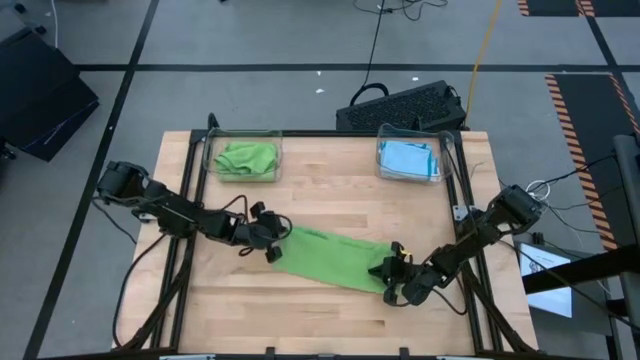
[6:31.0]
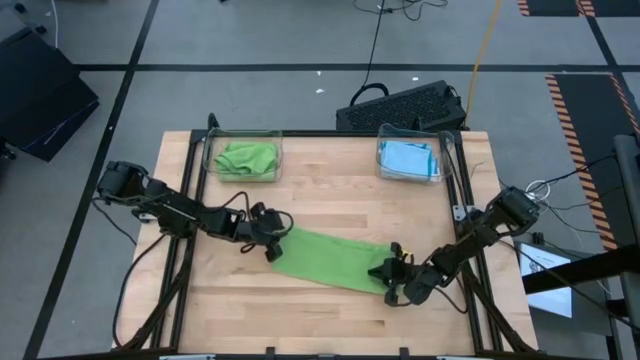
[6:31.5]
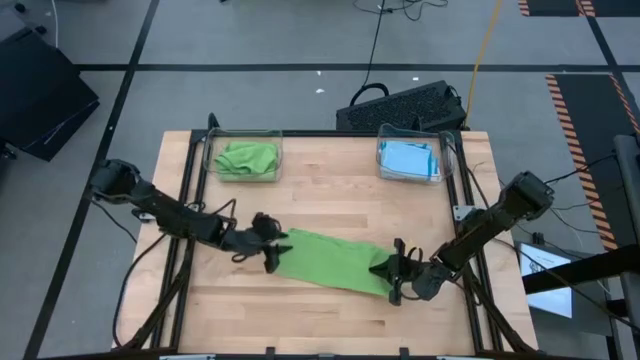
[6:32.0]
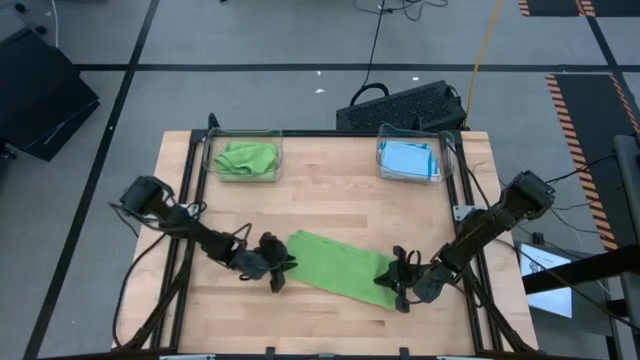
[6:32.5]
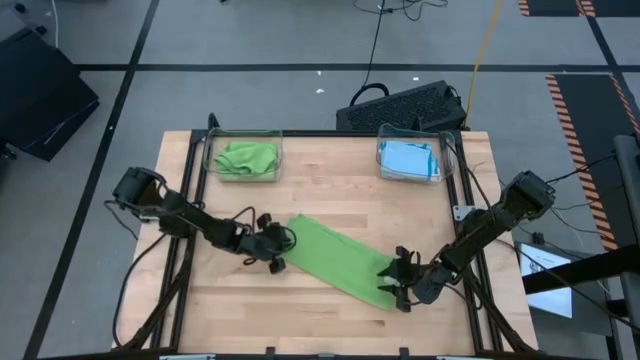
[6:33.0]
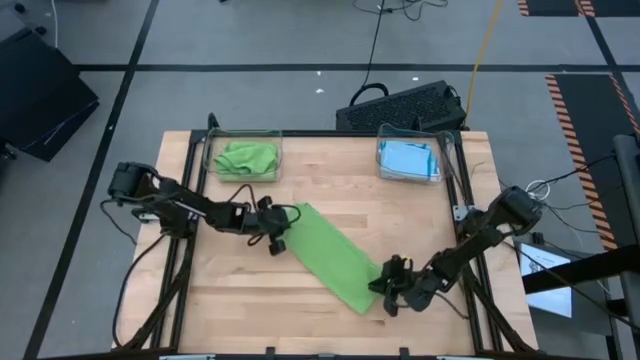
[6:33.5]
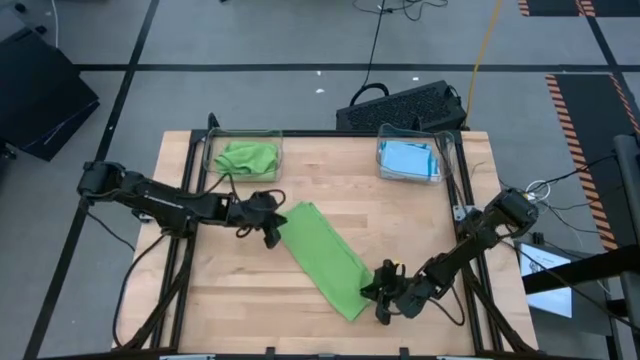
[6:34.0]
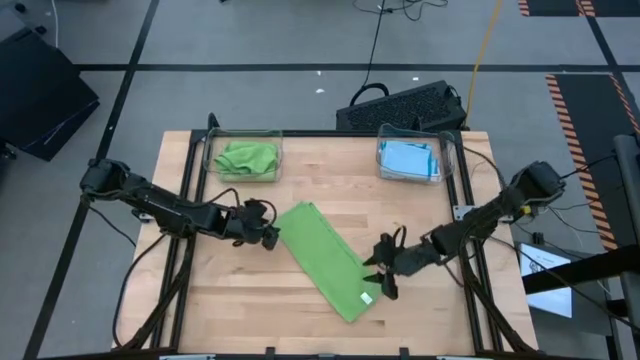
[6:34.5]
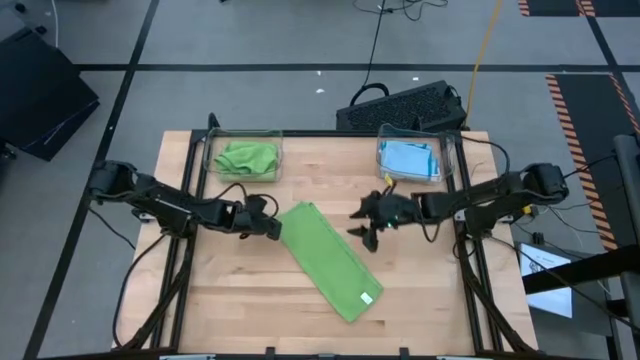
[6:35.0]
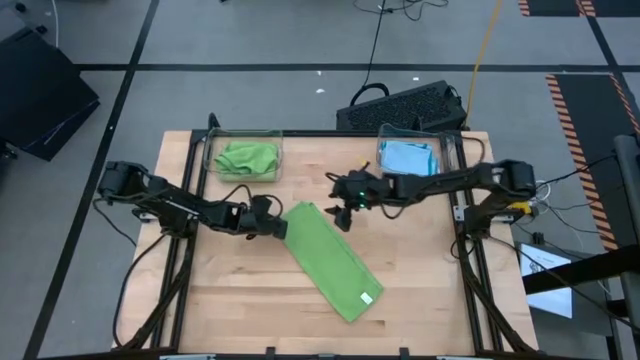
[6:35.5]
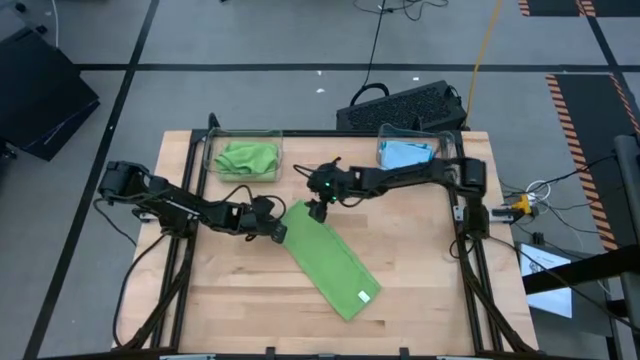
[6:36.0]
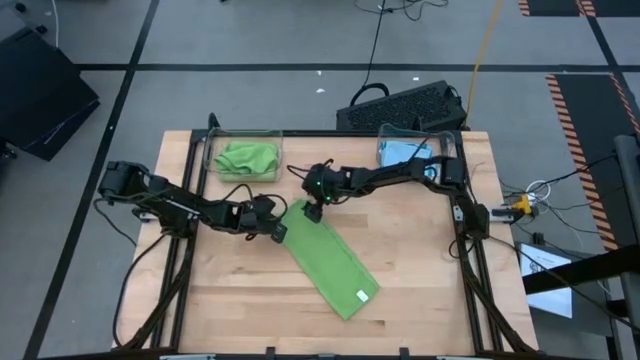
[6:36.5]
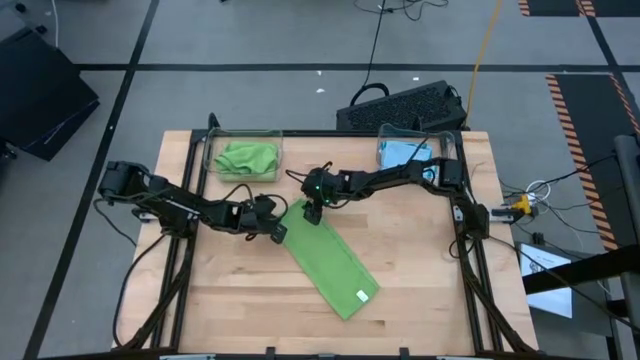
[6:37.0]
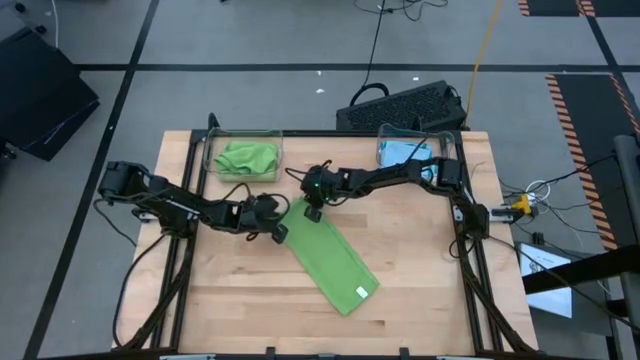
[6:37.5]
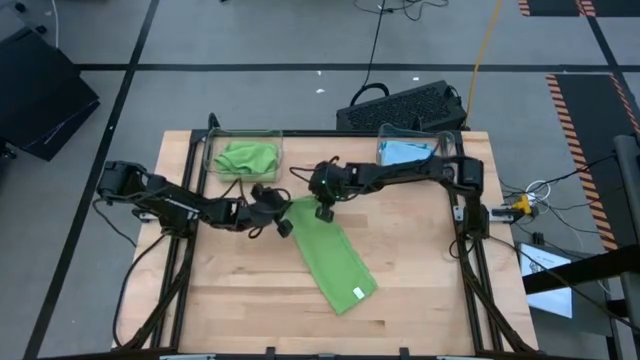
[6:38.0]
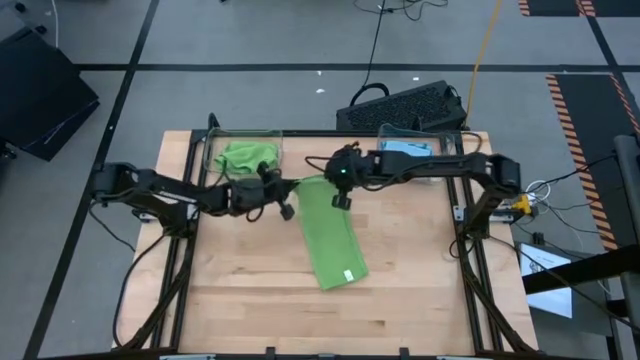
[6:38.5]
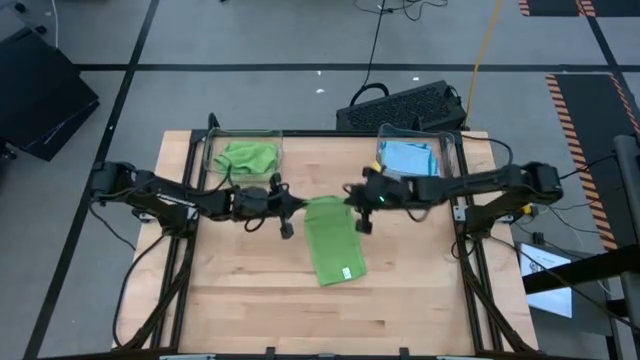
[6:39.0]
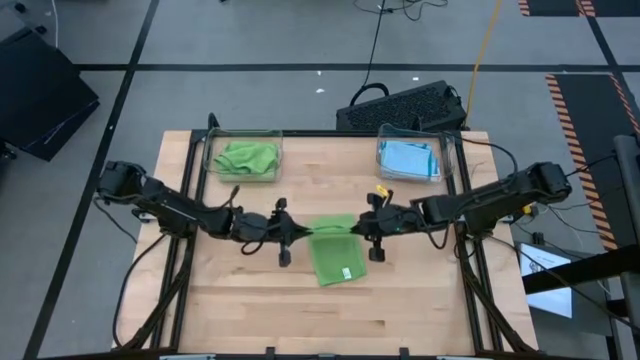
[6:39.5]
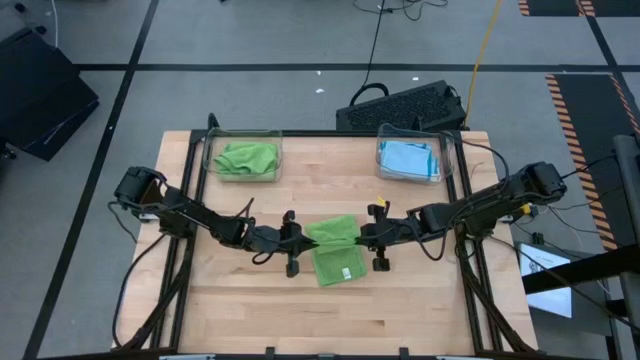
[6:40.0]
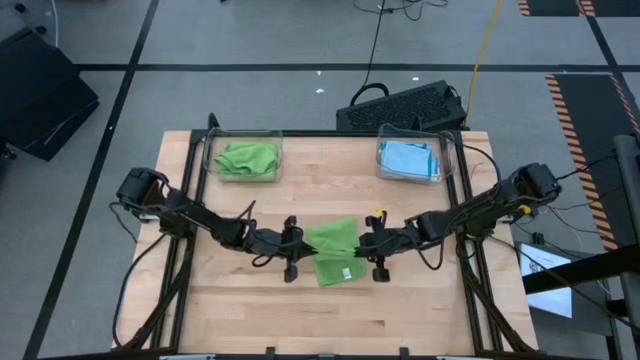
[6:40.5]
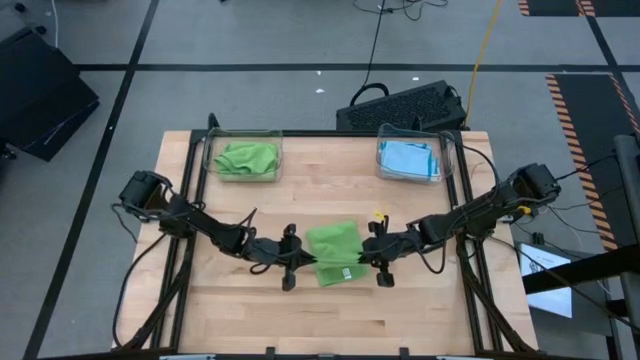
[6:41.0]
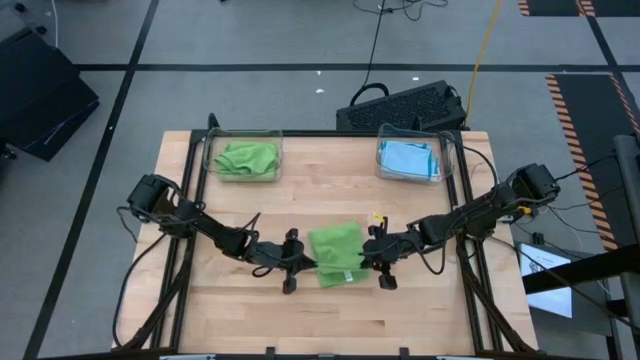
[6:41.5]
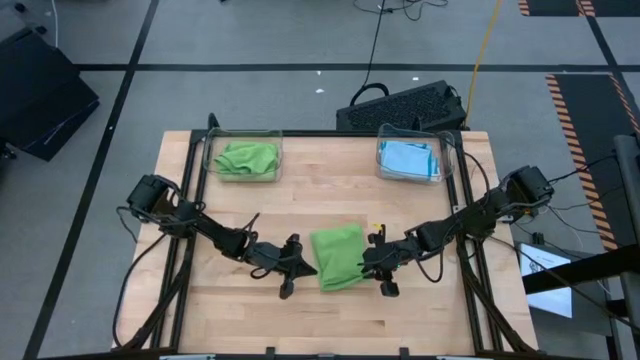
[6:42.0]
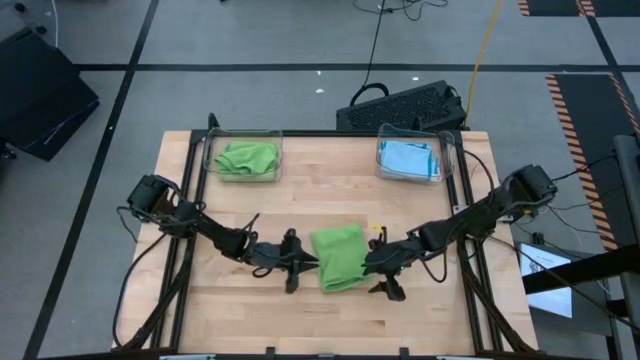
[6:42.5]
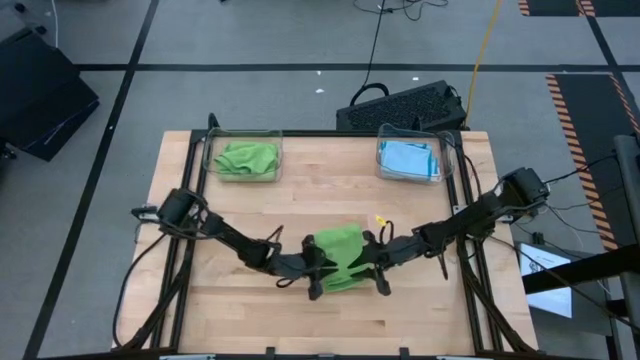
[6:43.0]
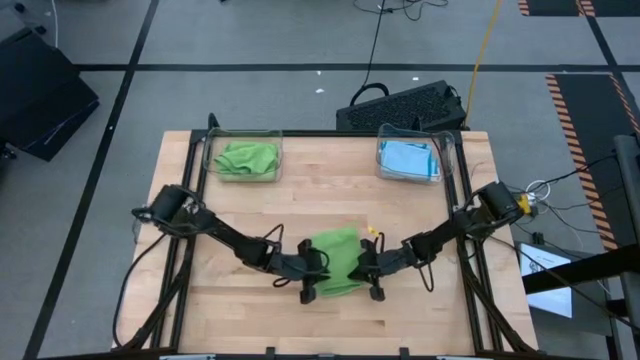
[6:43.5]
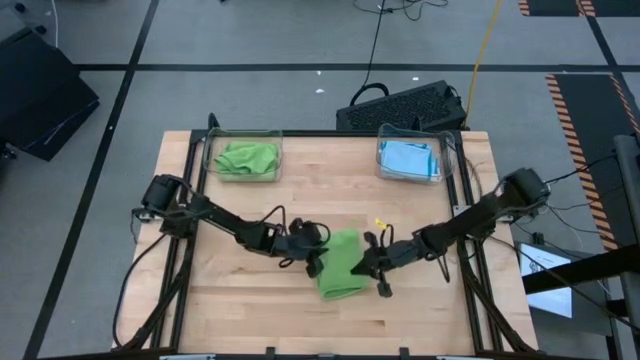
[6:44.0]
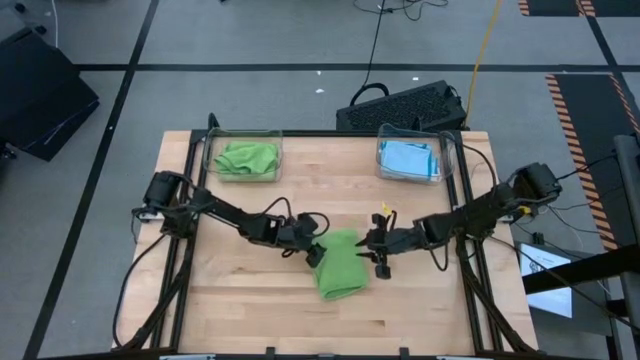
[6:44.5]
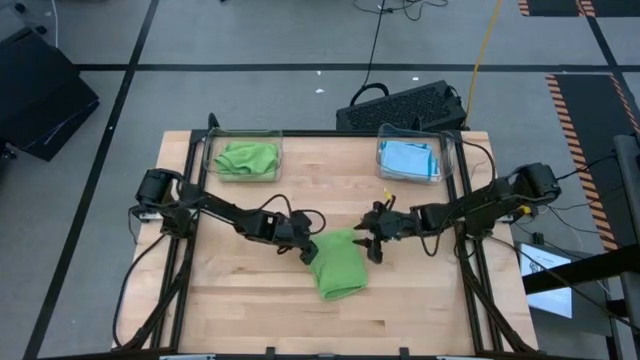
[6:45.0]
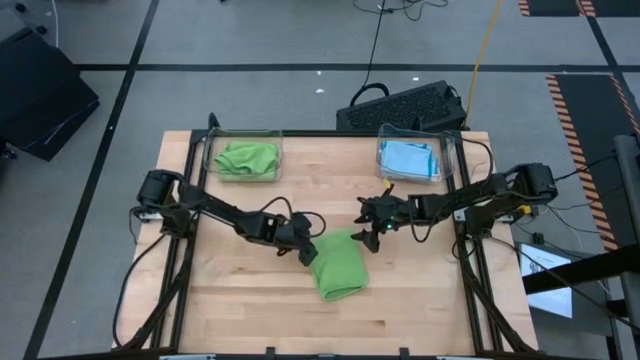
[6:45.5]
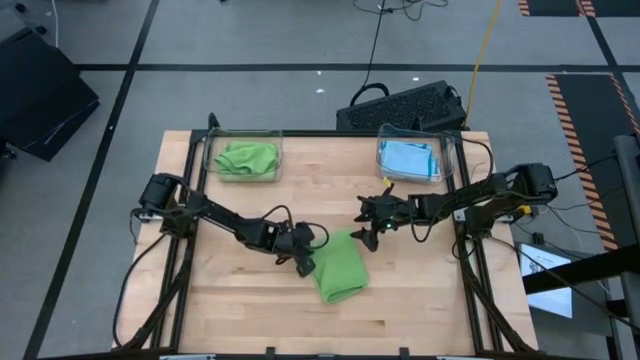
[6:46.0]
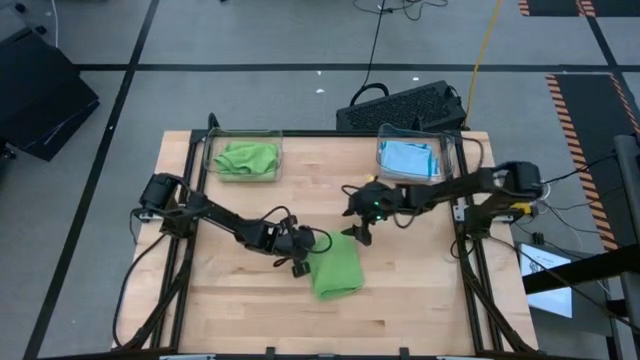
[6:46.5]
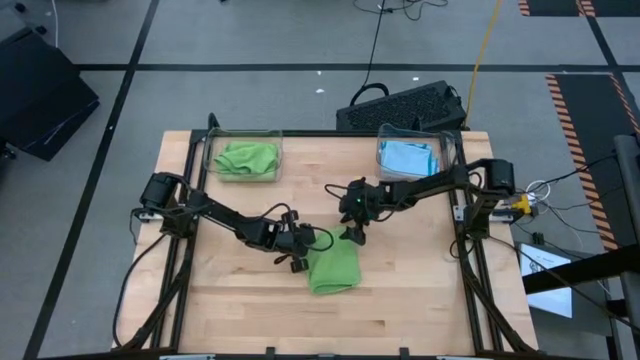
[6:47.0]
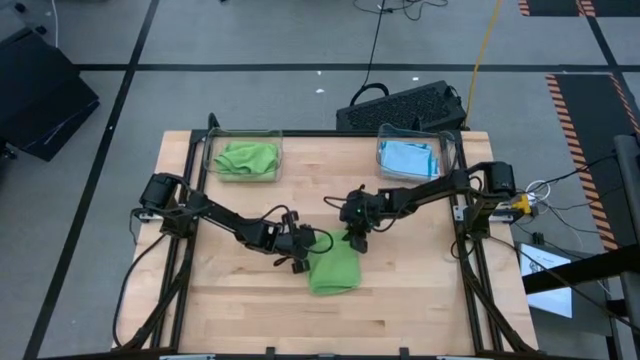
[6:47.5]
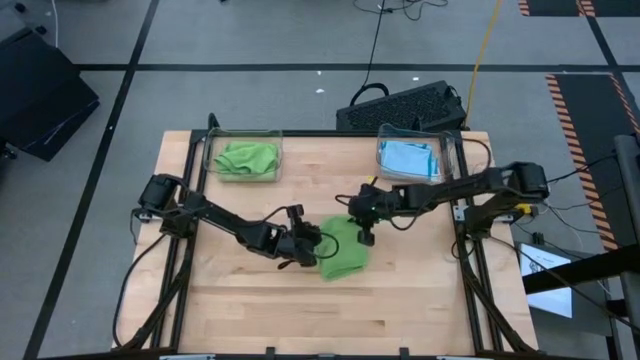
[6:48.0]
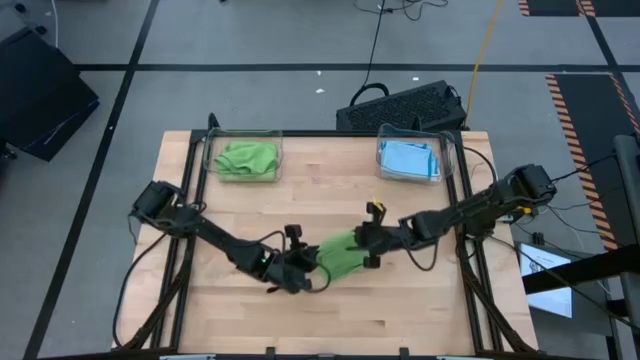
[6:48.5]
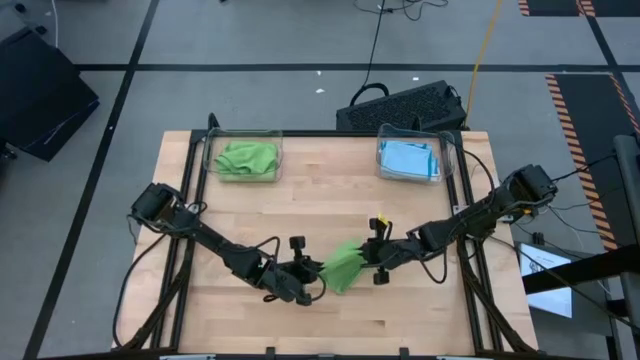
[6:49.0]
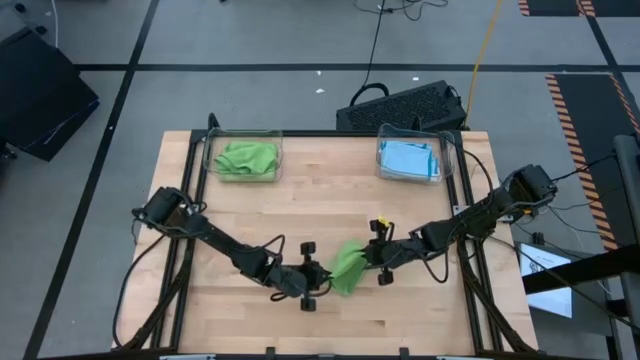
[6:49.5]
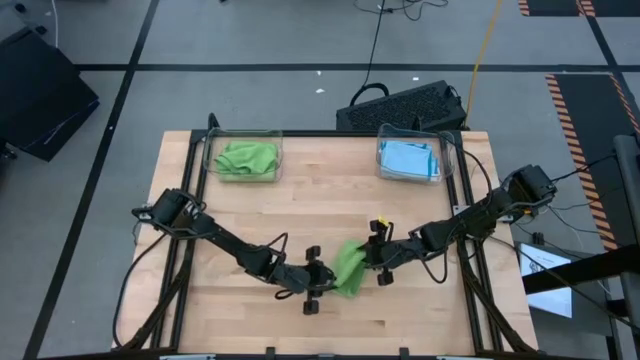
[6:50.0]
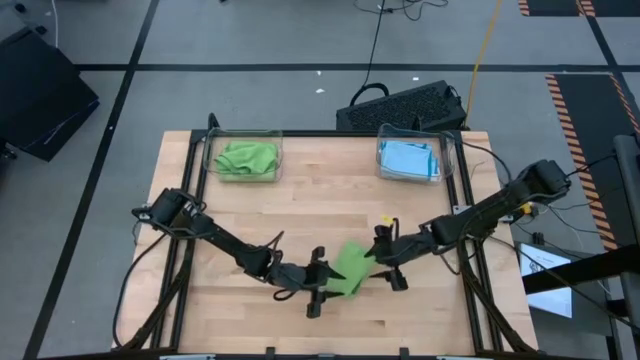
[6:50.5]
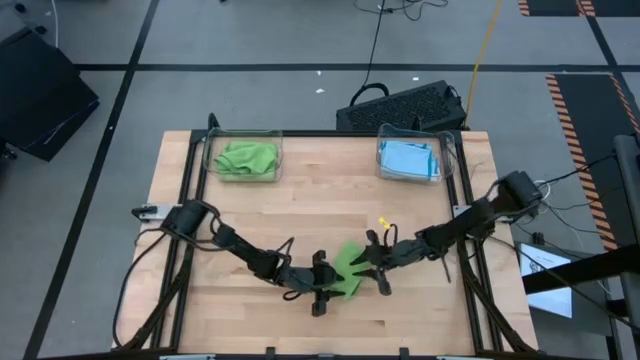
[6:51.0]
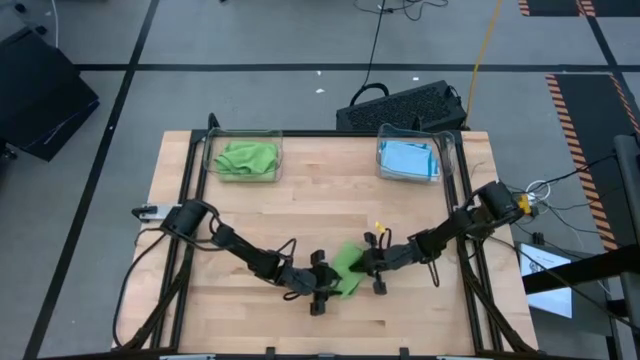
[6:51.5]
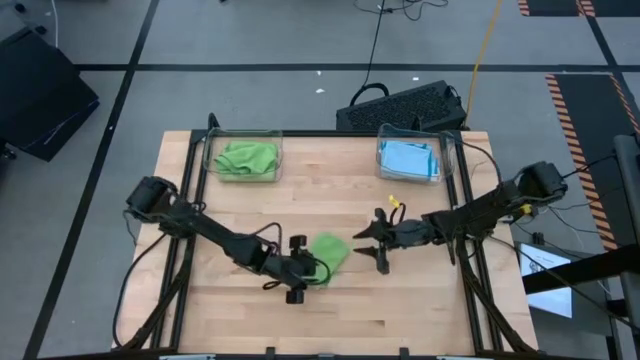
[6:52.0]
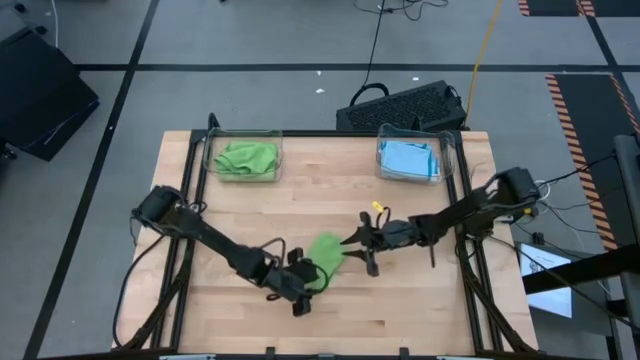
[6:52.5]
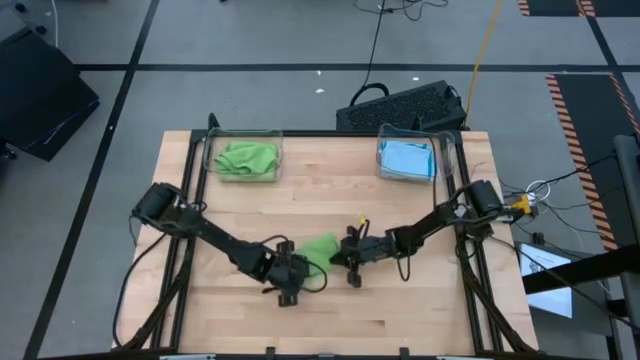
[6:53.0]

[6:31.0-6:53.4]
Task: Fold microfiber towels
Fold the green microfiber cloth
